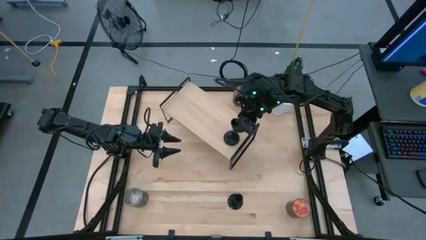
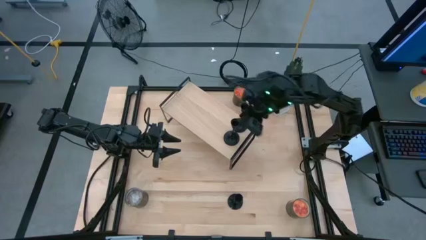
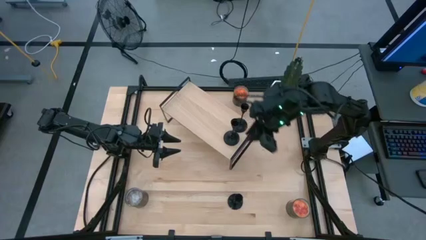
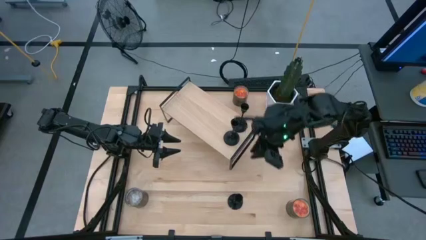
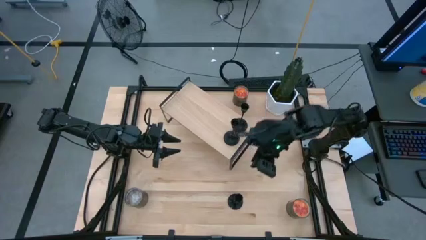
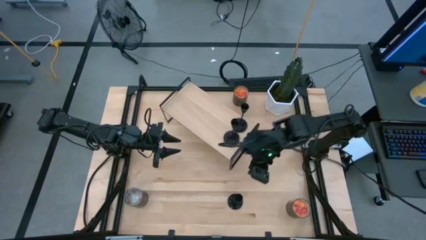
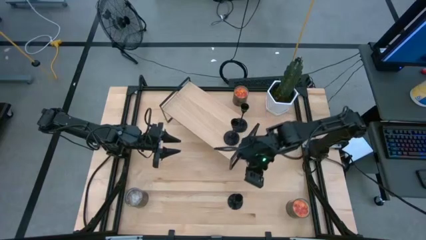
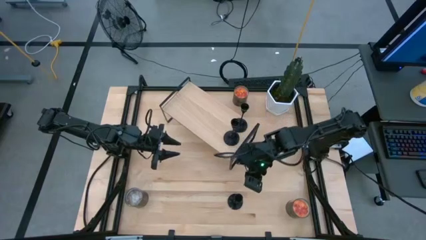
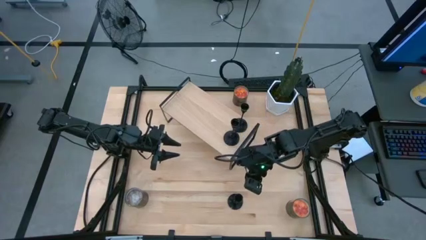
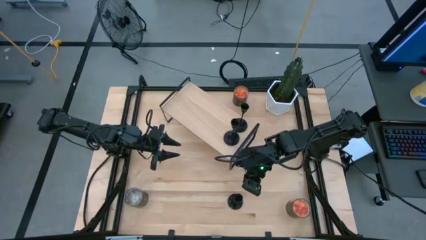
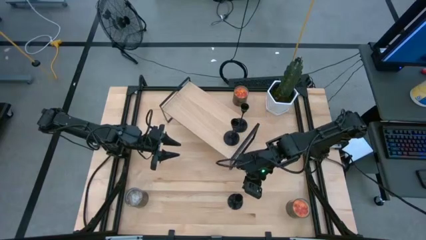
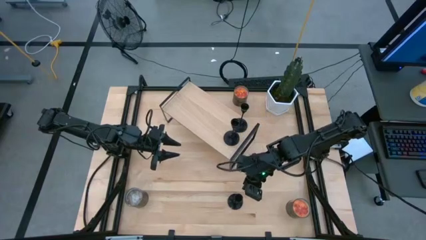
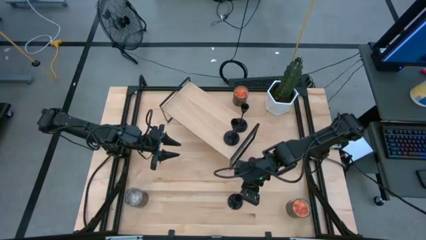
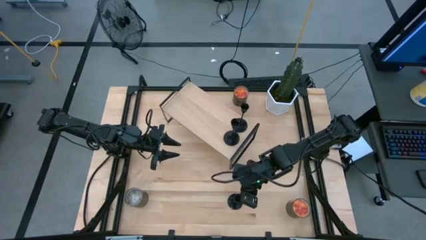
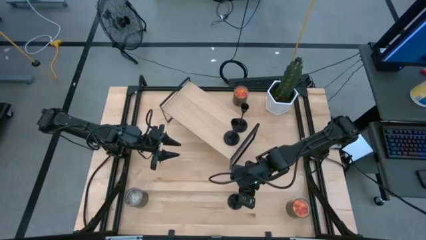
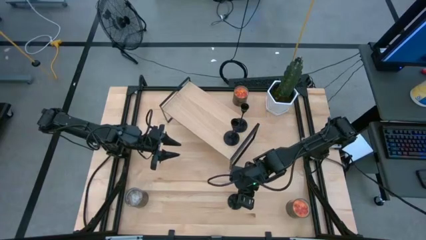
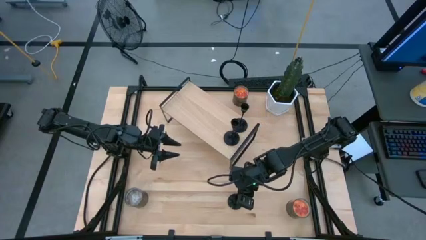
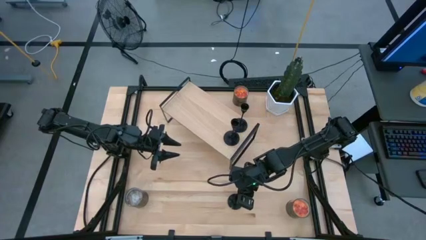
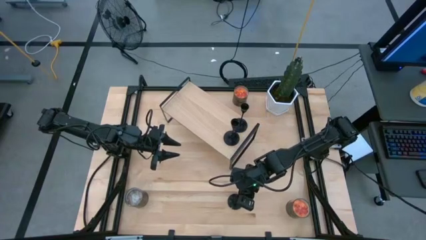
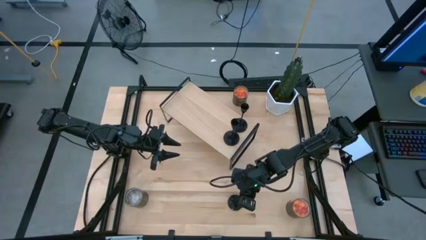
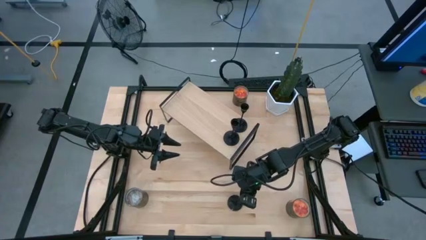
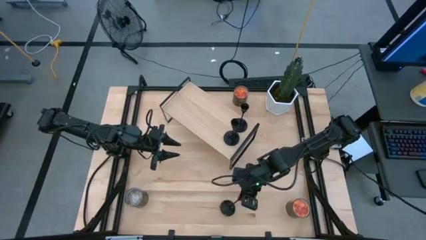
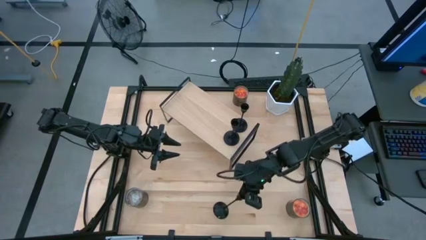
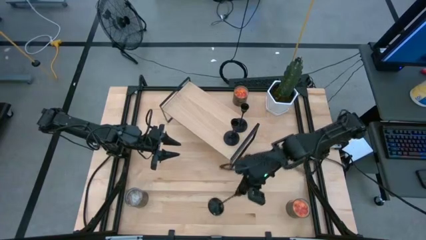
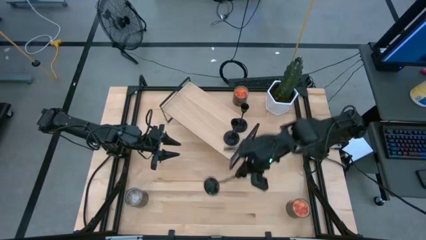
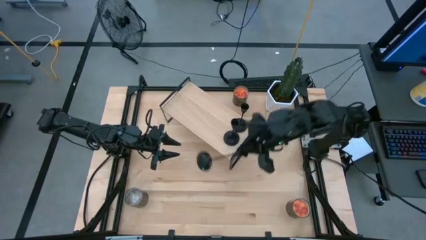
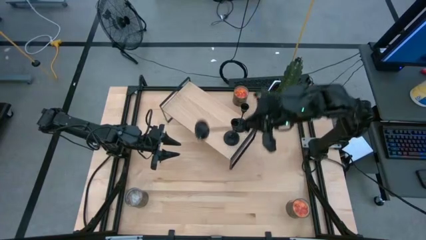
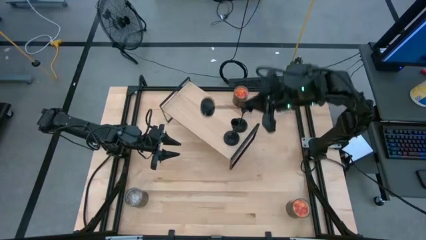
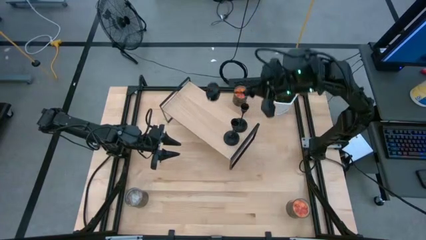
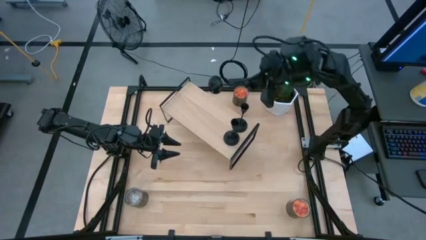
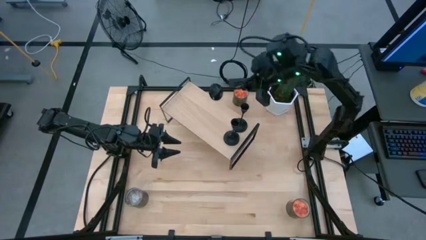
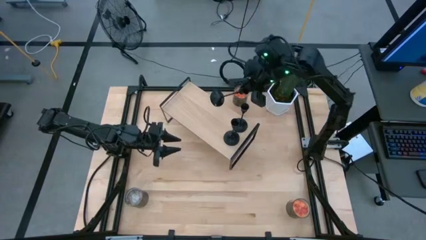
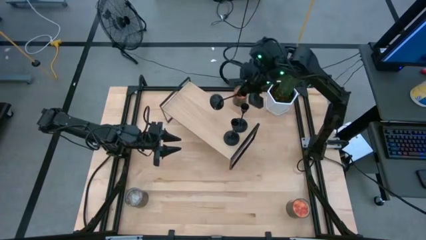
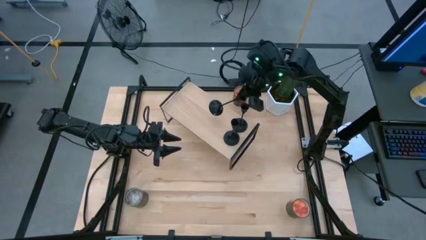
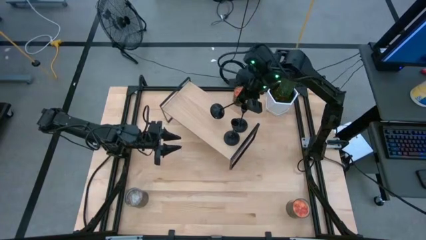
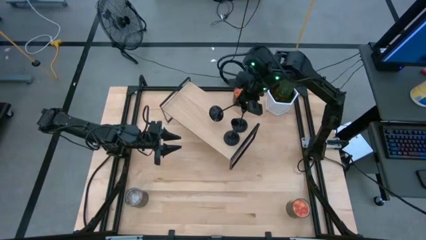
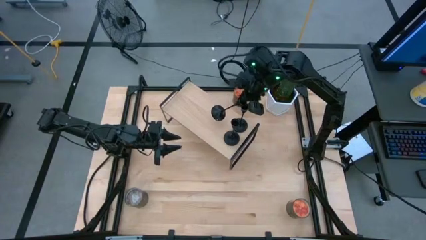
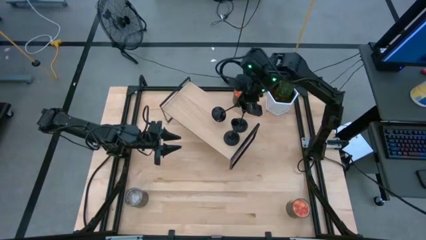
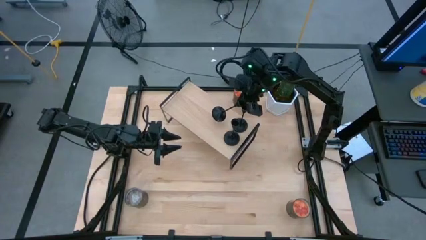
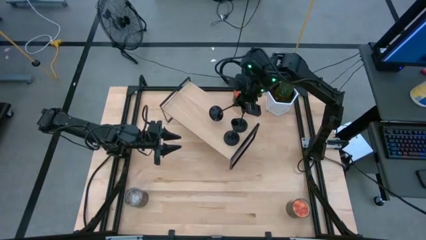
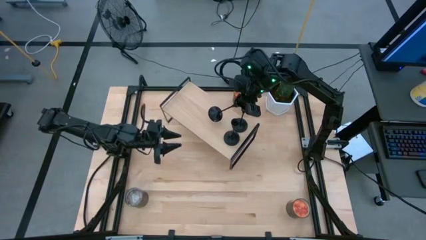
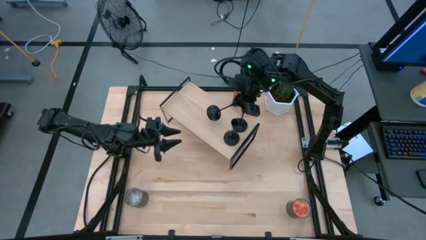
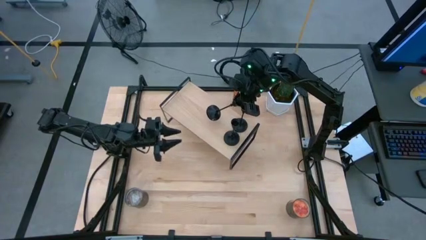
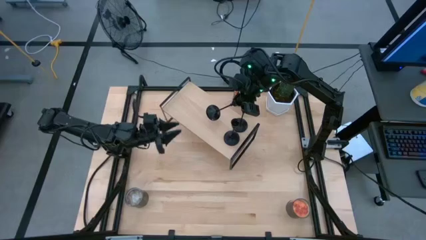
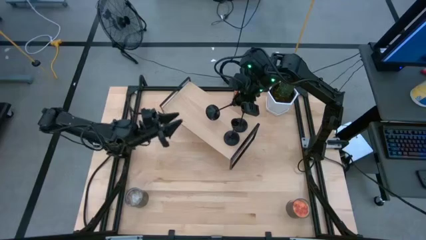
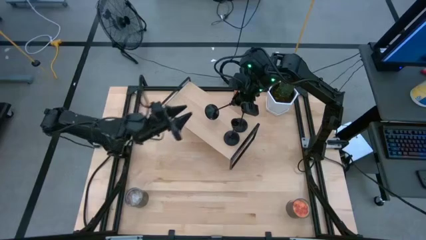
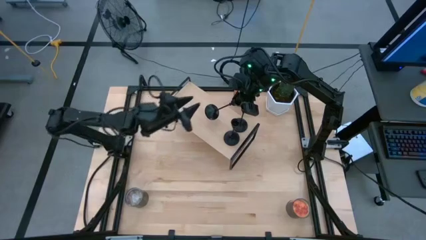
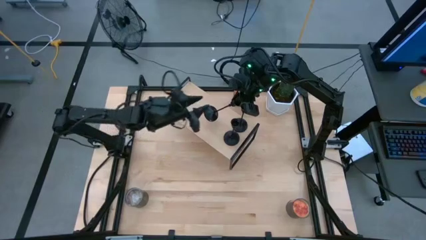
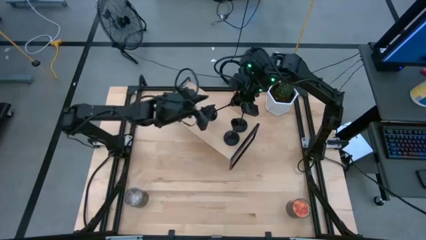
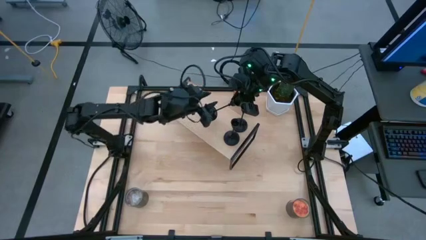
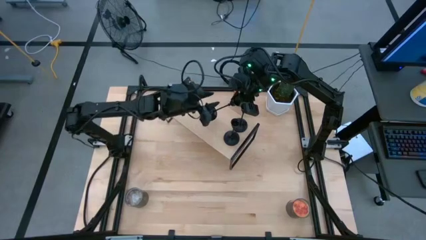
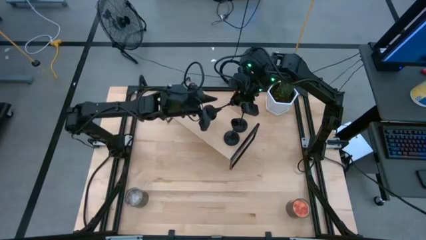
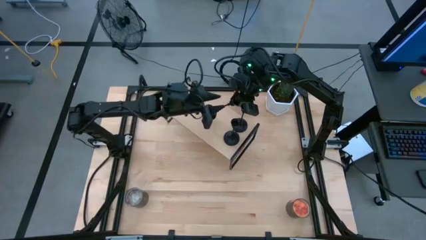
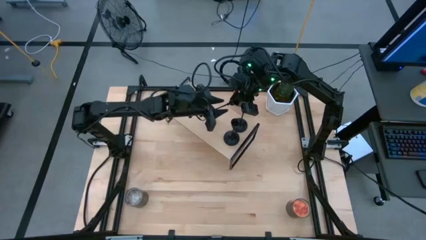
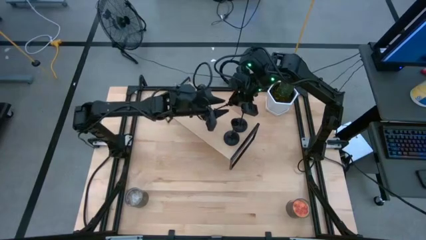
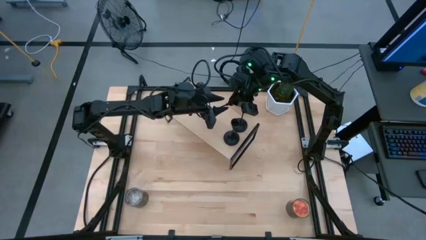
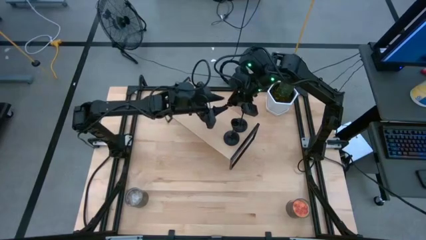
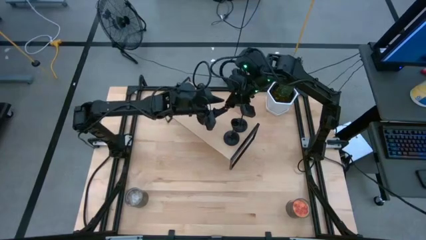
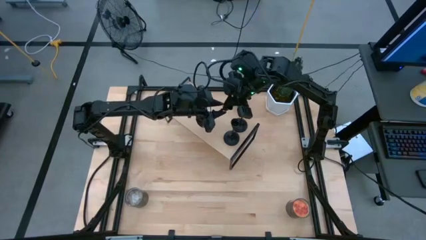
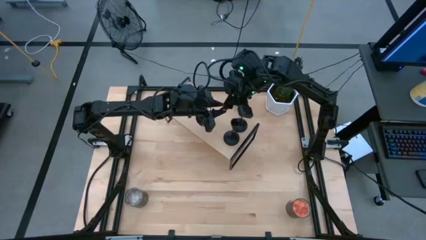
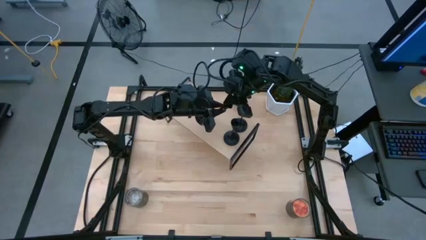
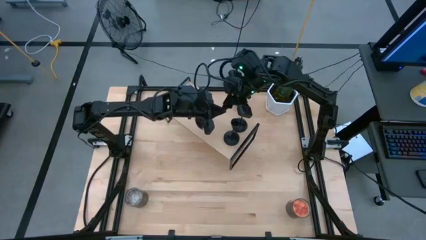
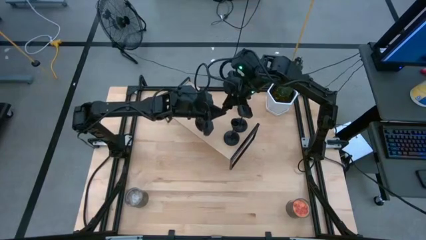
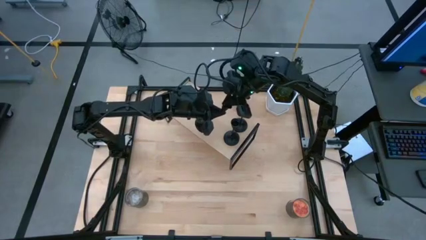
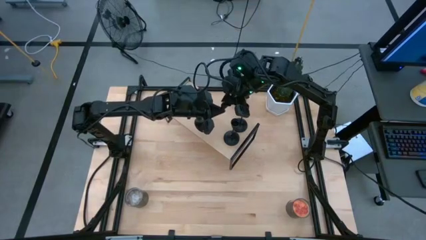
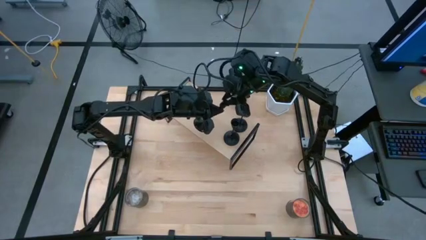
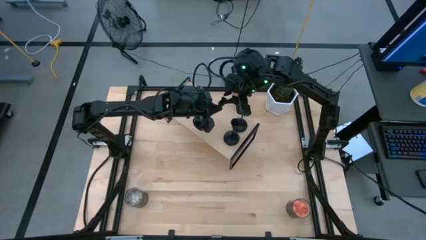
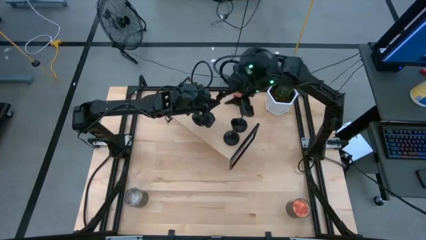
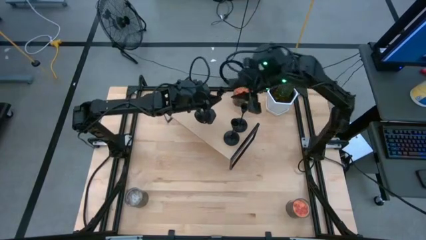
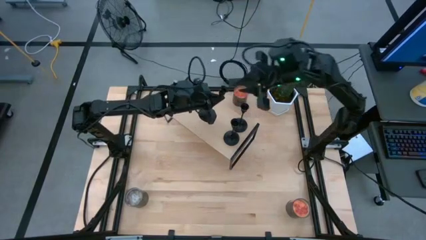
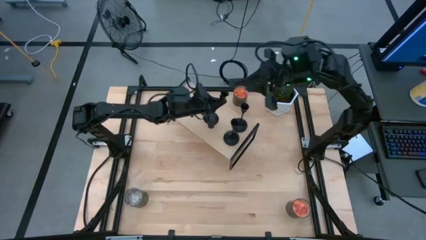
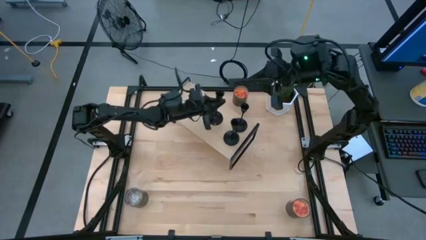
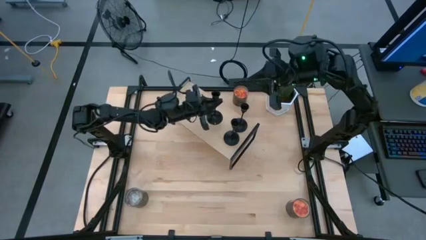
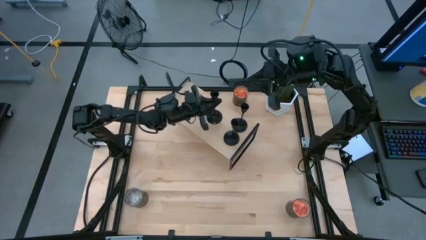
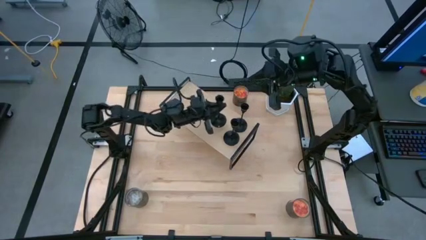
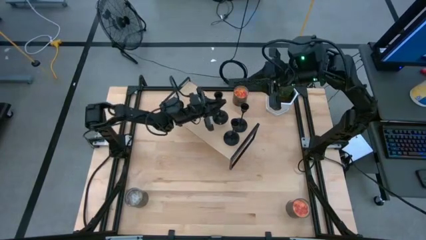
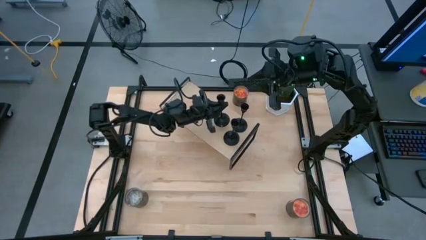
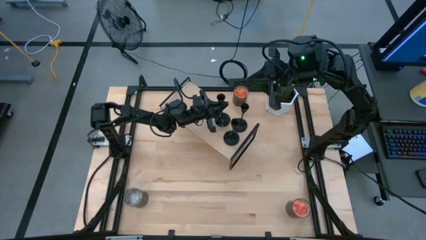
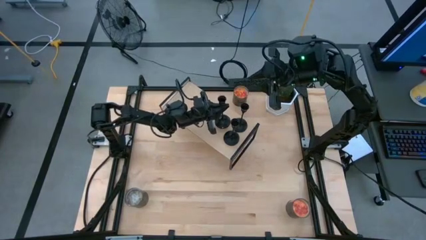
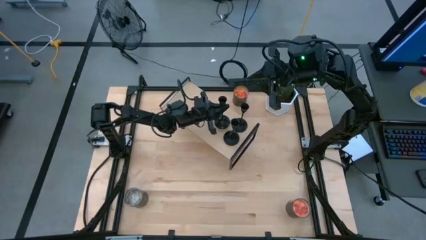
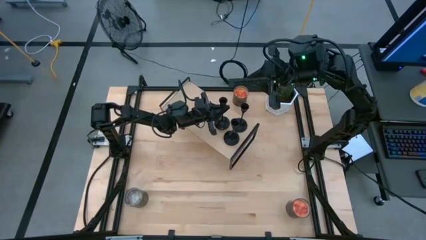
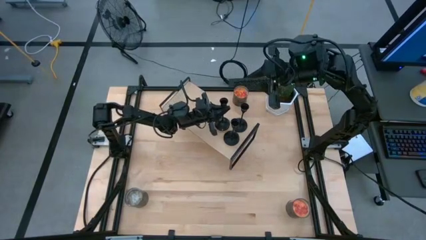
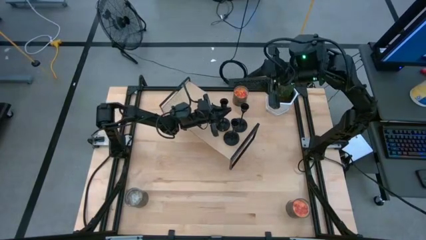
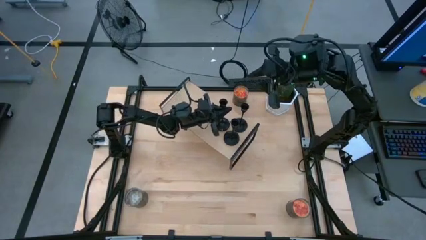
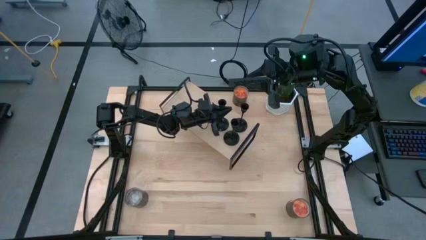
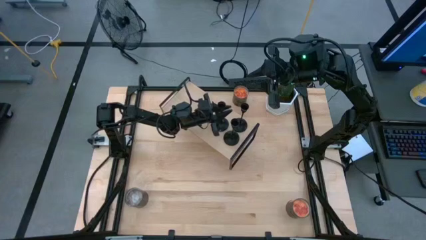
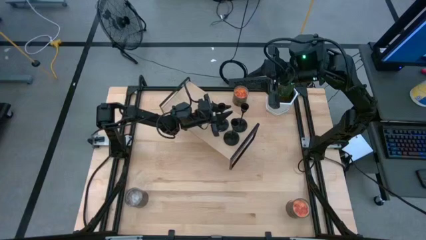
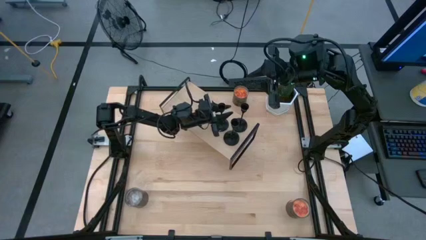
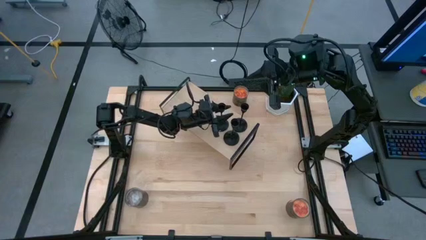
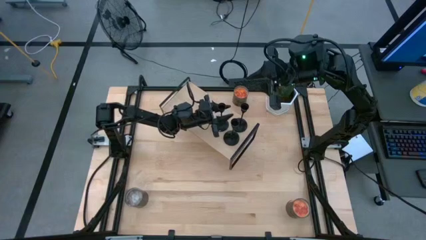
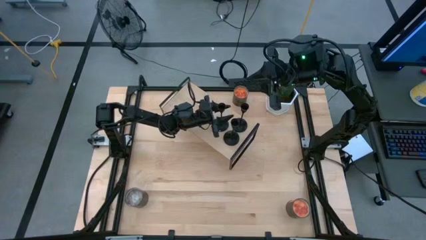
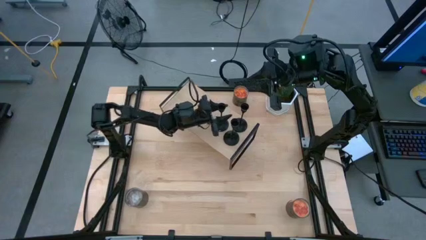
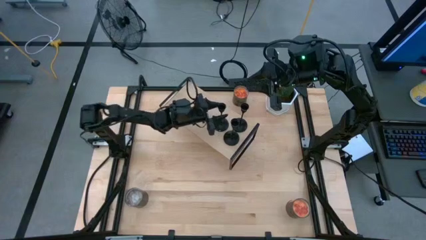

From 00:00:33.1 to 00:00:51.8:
Task: Pick & Place candle stick holders
Put the black candle holder on the shelf
